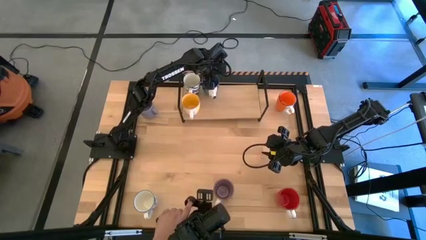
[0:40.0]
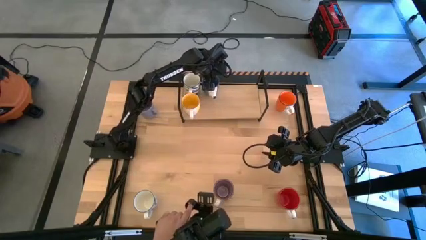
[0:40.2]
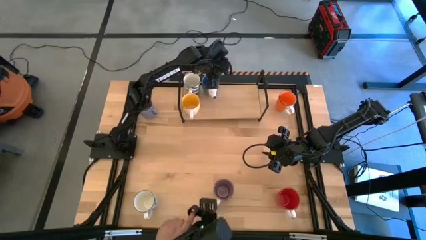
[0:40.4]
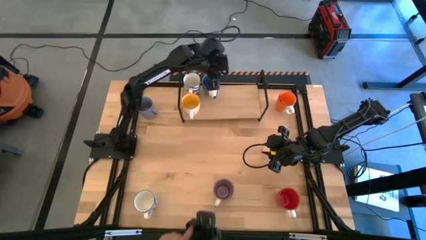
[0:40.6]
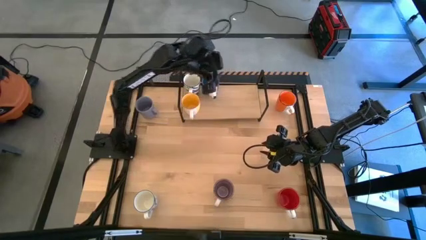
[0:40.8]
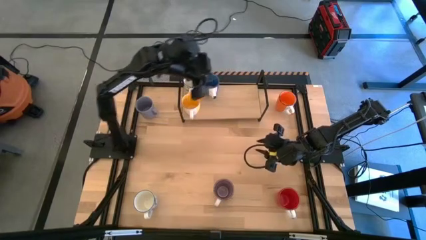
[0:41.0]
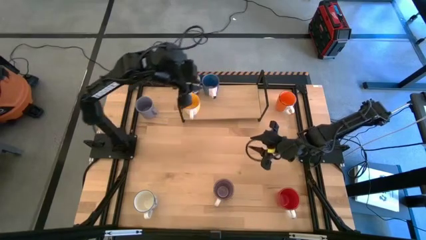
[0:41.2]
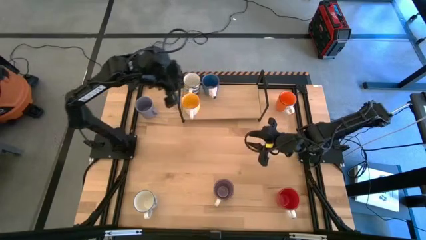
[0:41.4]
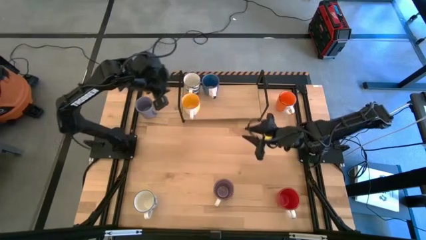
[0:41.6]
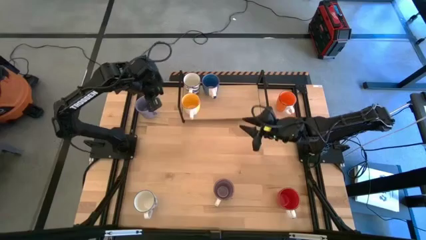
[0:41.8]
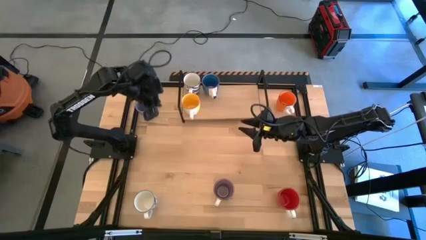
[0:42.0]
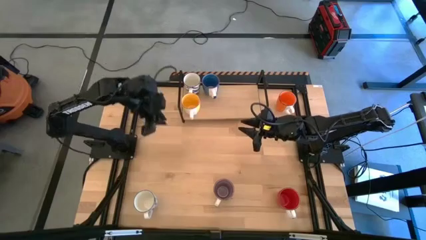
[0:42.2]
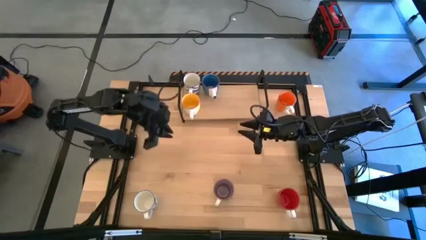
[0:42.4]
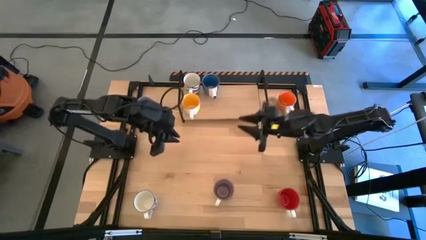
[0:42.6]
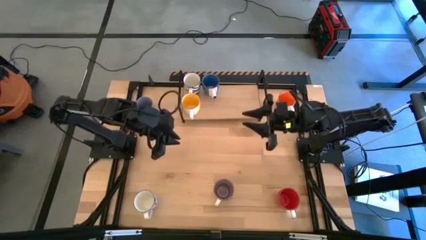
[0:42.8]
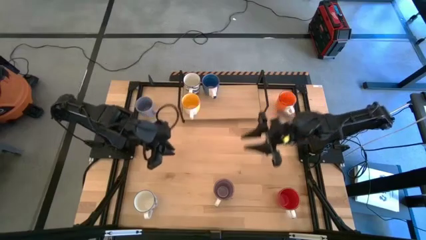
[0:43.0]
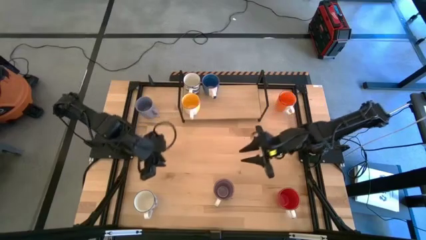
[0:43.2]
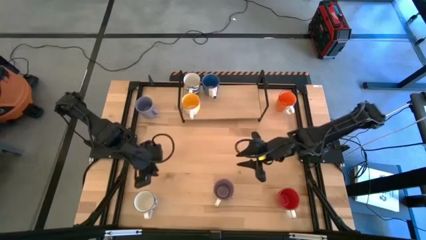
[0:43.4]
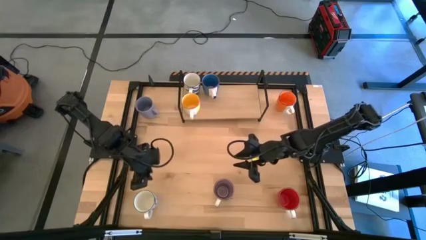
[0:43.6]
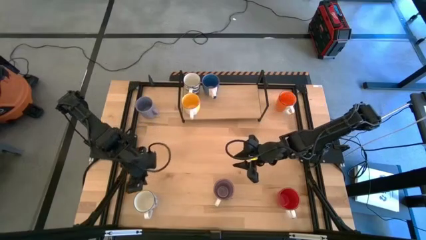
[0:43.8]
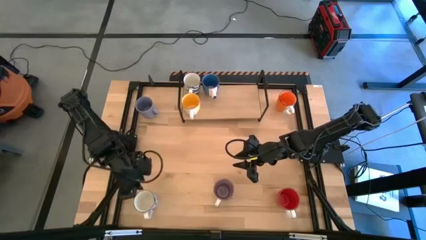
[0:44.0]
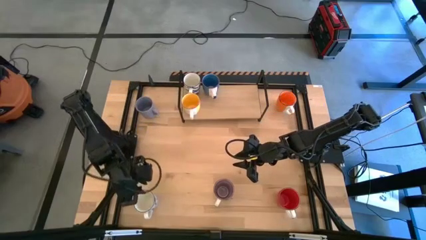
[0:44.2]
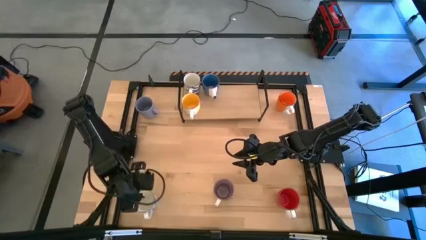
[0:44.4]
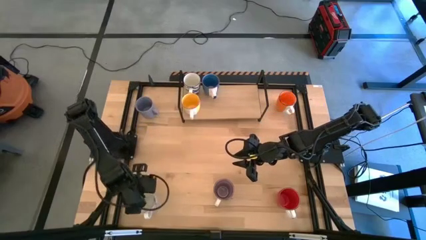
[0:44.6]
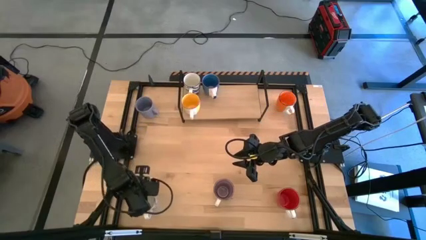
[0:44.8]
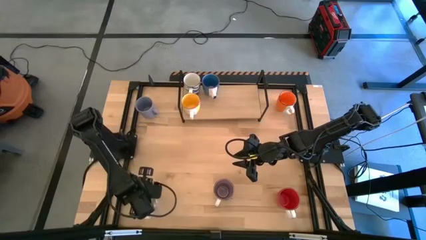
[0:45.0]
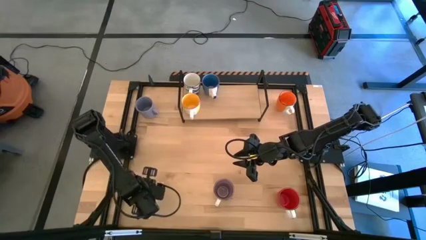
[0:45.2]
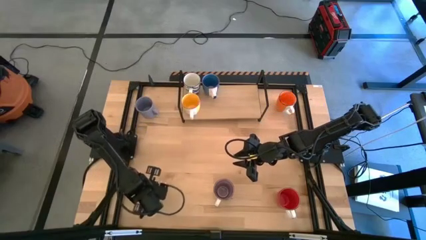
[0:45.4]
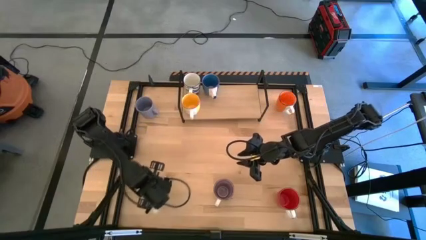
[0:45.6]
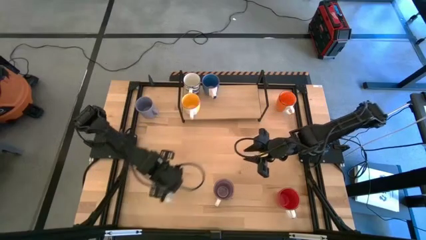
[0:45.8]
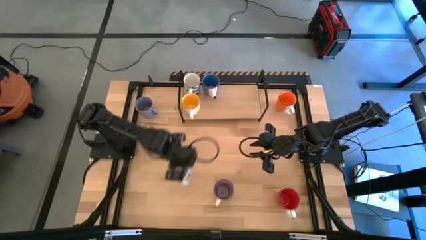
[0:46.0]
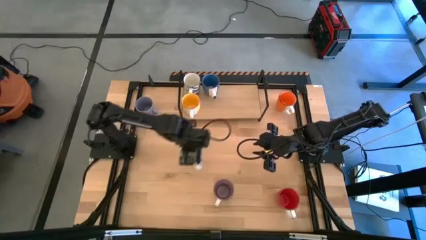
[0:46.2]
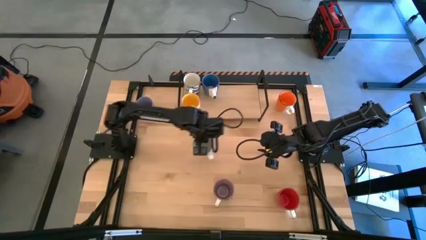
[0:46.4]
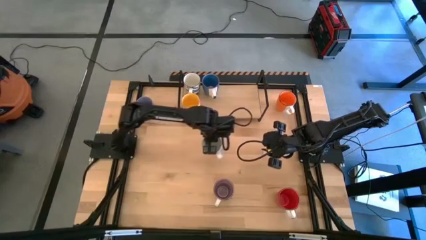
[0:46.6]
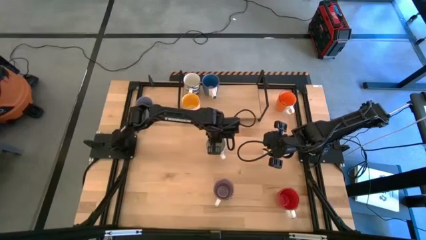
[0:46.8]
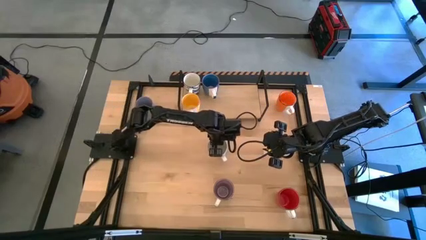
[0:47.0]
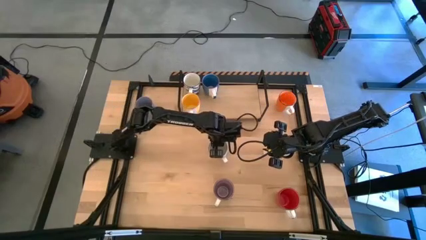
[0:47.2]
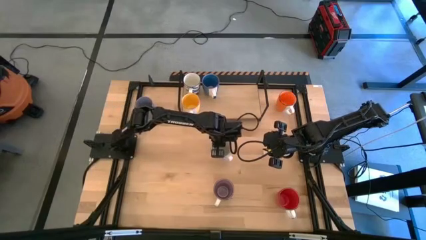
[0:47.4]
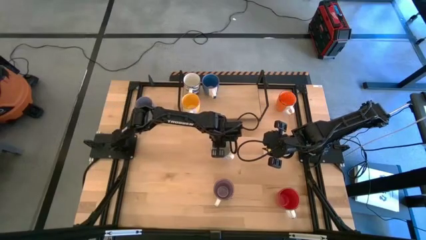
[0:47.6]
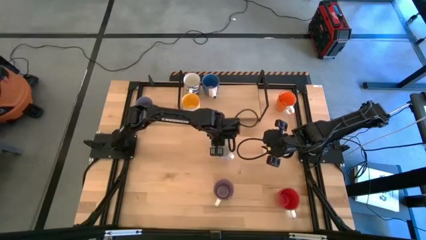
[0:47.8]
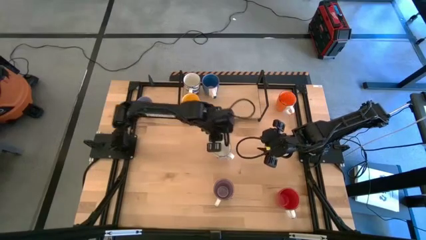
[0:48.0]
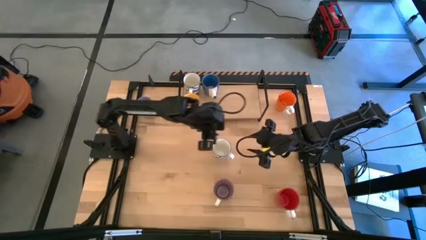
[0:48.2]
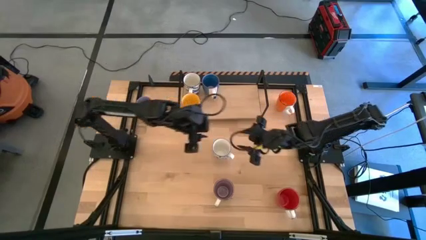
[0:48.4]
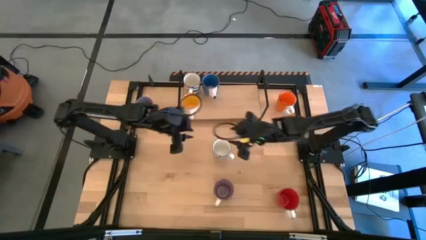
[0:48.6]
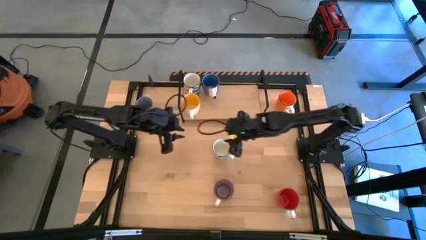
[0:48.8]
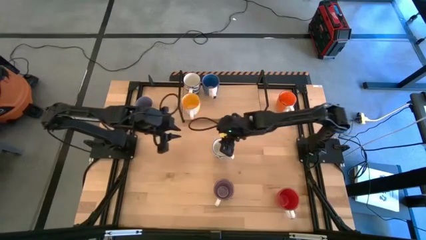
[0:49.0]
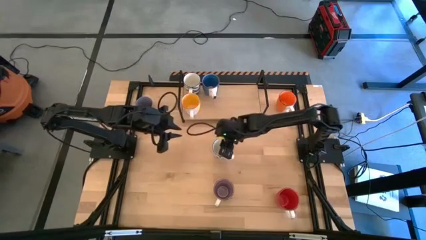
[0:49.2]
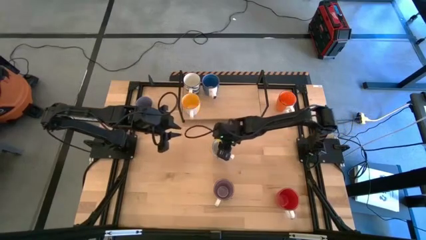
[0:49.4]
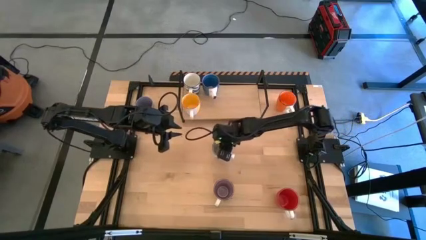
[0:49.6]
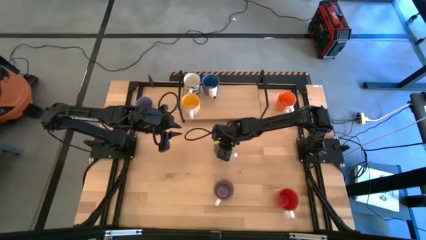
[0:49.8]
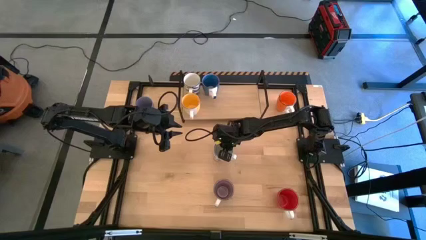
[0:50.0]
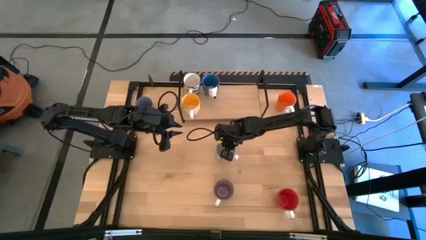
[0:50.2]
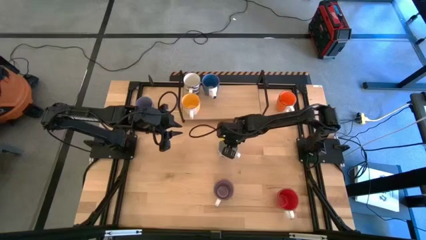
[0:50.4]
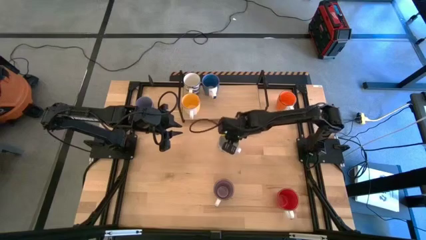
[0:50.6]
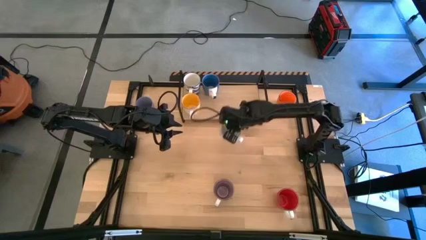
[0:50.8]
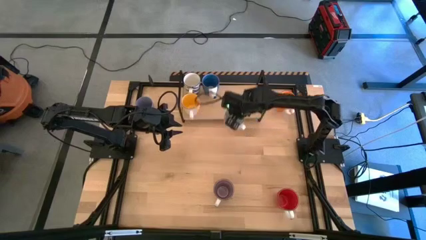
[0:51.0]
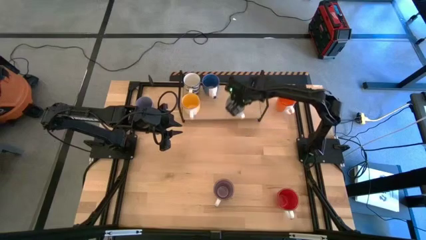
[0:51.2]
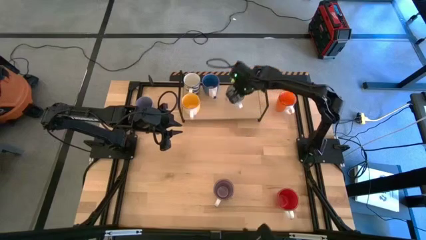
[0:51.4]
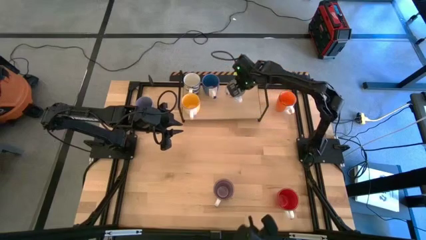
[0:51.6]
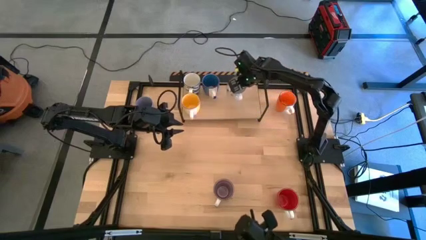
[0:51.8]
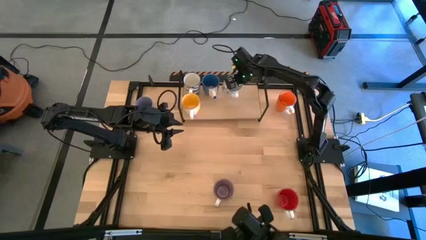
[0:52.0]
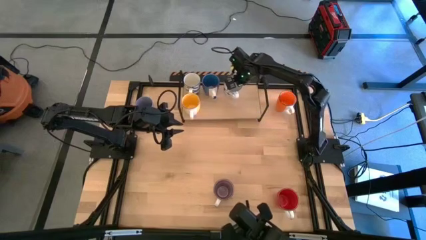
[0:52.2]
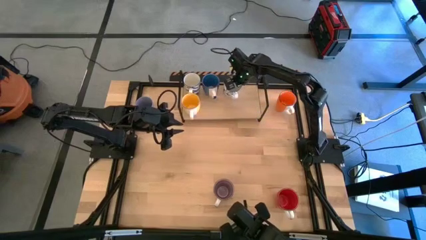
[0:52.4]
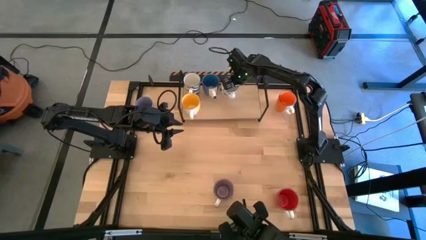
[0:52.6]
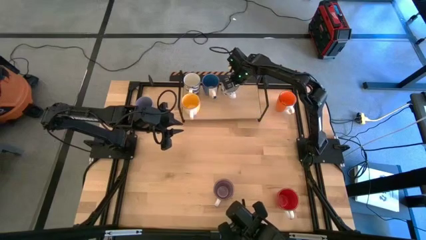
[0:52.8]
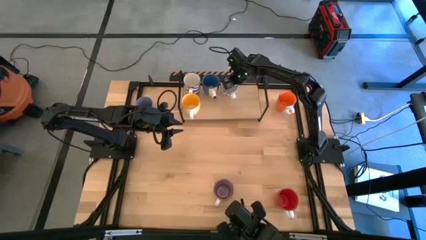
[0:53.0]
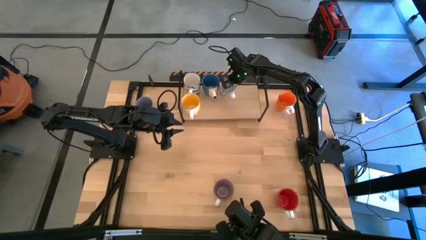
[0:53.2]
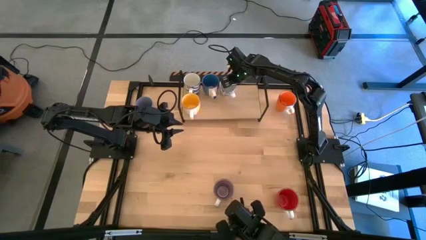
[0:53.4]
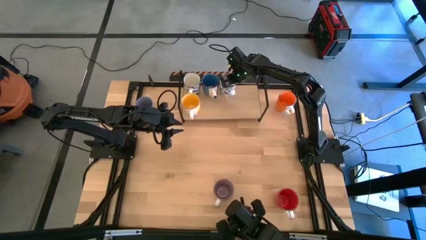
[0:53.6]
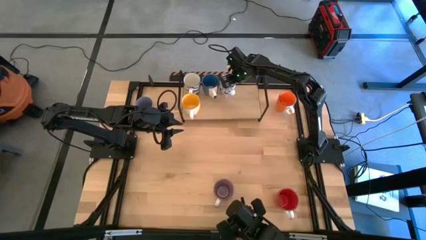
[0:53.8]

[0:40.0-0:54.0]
Task: Place coffee mugs
Put the blue patterned mug on the shelf
